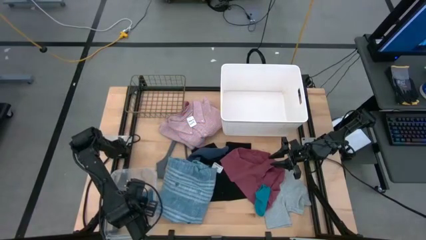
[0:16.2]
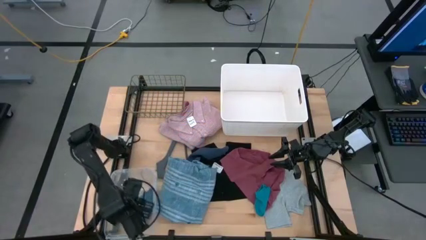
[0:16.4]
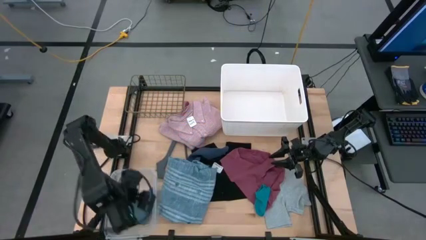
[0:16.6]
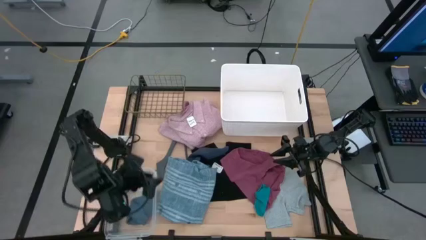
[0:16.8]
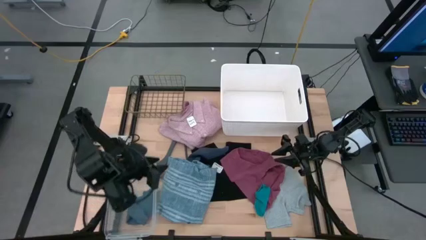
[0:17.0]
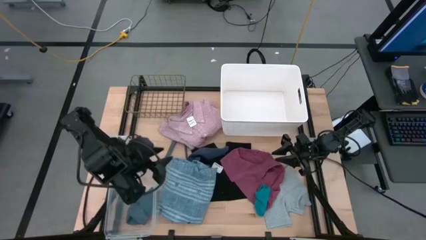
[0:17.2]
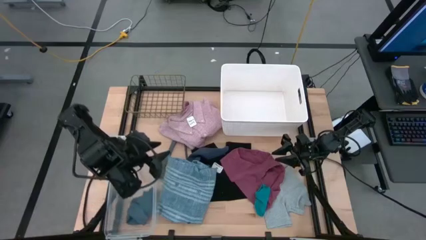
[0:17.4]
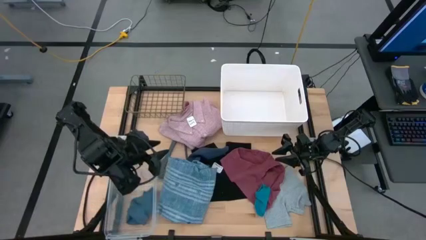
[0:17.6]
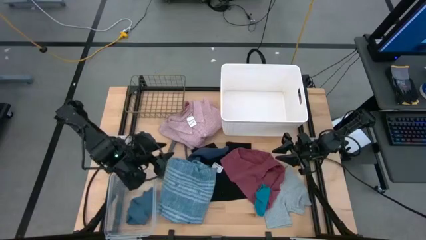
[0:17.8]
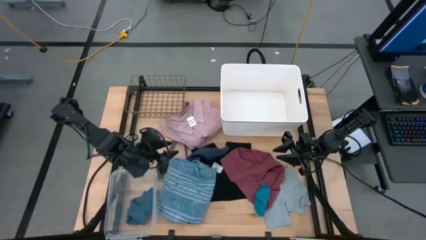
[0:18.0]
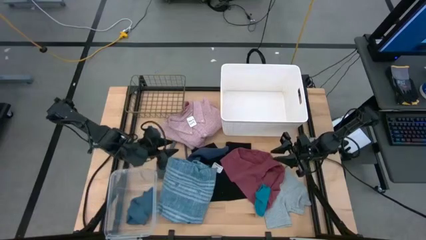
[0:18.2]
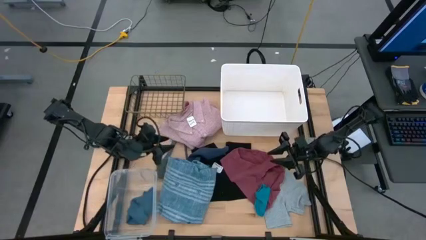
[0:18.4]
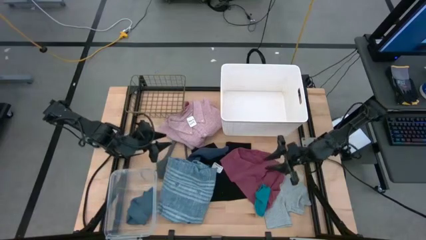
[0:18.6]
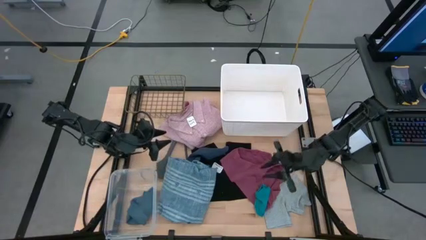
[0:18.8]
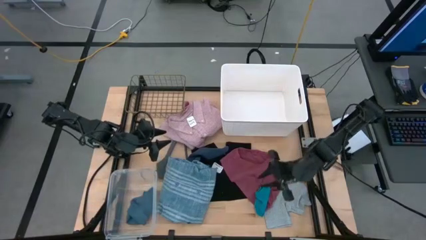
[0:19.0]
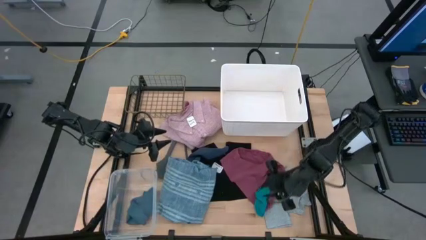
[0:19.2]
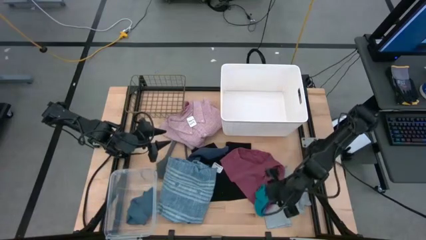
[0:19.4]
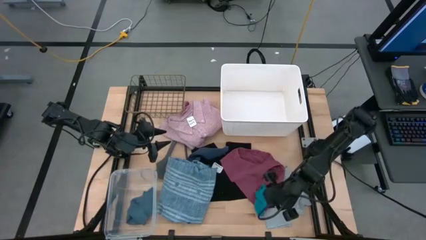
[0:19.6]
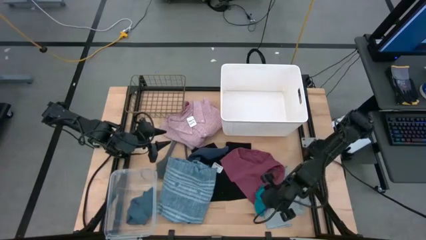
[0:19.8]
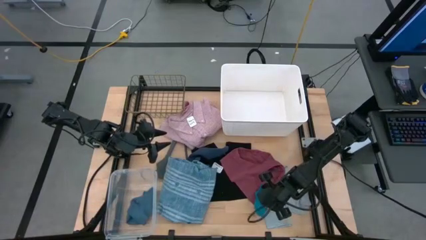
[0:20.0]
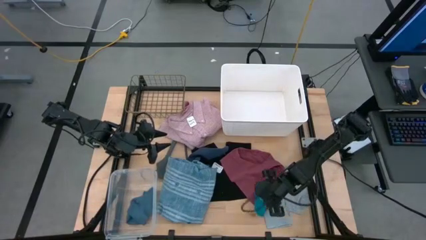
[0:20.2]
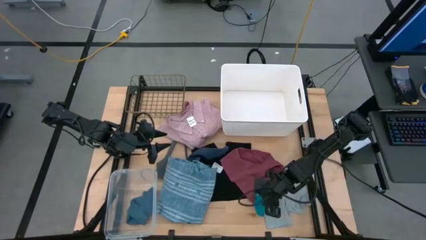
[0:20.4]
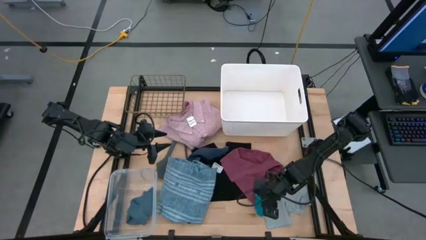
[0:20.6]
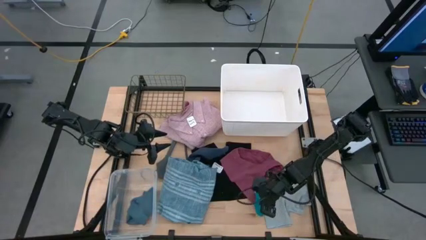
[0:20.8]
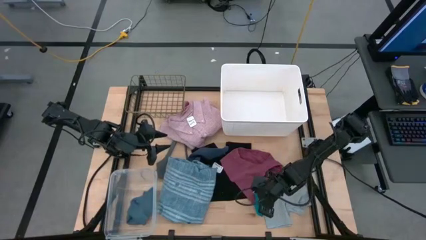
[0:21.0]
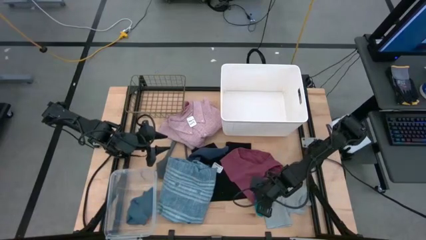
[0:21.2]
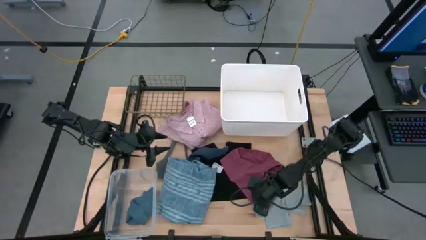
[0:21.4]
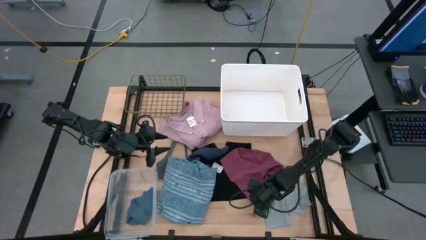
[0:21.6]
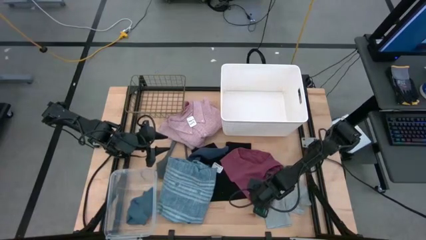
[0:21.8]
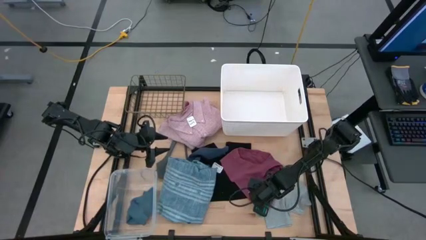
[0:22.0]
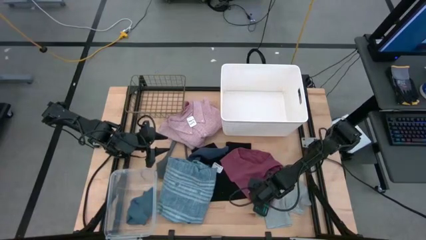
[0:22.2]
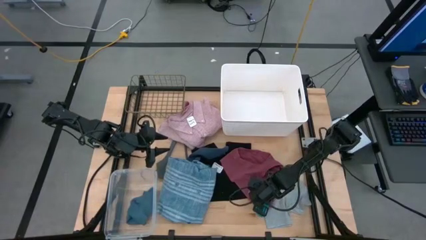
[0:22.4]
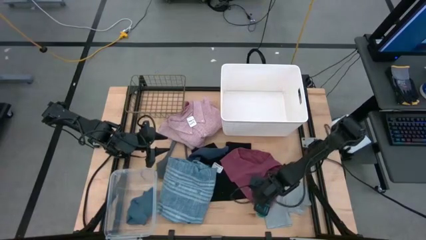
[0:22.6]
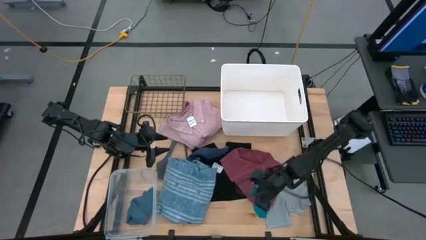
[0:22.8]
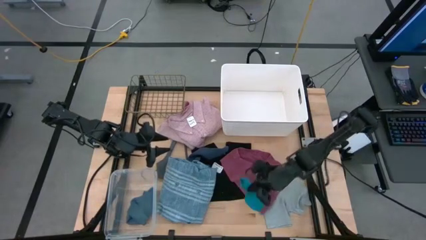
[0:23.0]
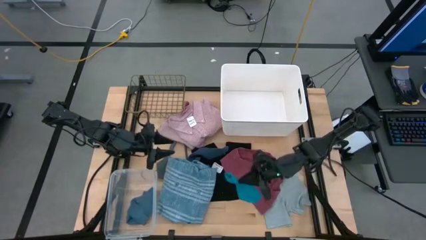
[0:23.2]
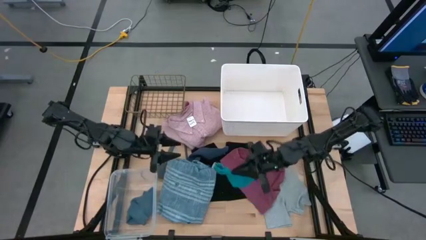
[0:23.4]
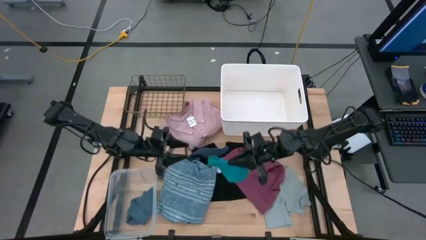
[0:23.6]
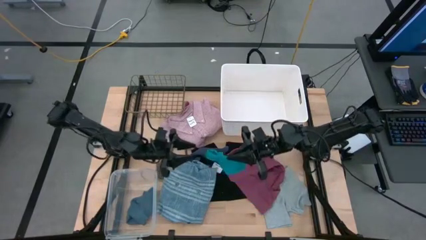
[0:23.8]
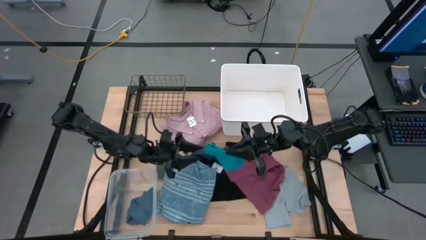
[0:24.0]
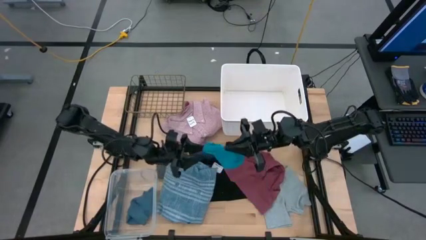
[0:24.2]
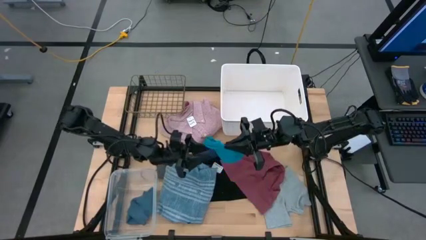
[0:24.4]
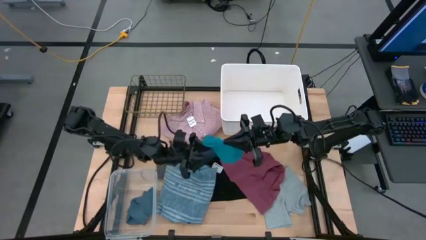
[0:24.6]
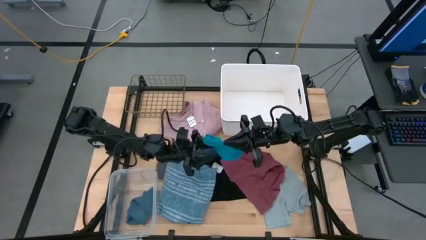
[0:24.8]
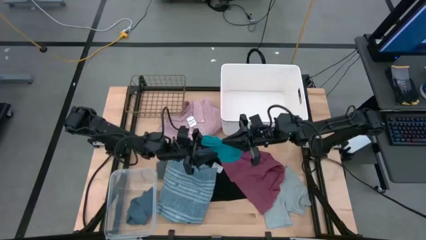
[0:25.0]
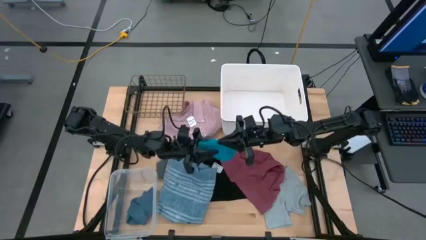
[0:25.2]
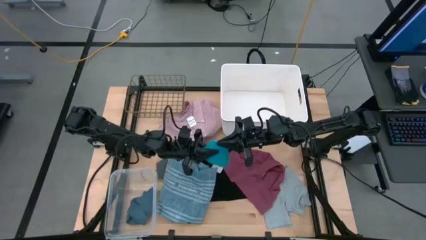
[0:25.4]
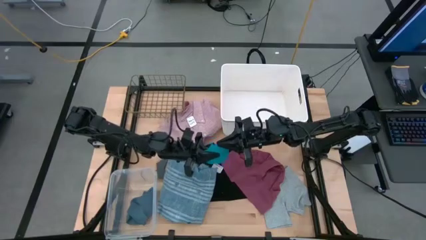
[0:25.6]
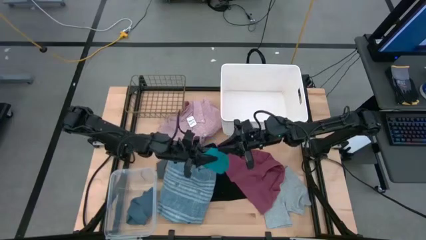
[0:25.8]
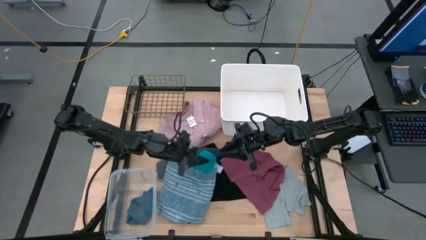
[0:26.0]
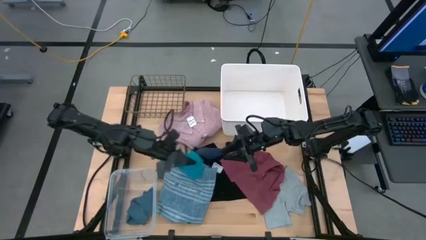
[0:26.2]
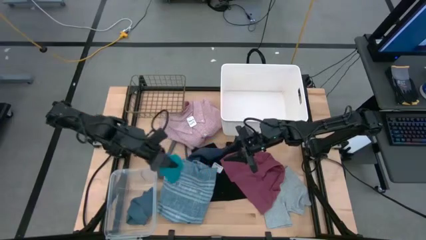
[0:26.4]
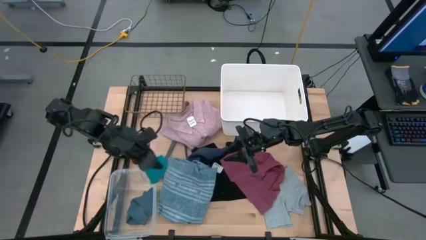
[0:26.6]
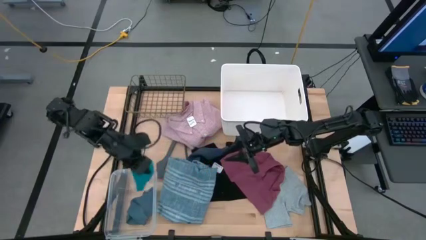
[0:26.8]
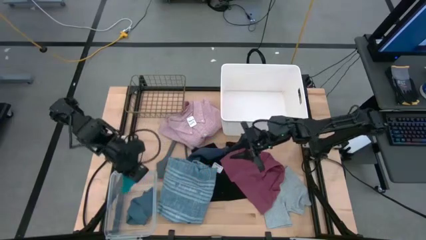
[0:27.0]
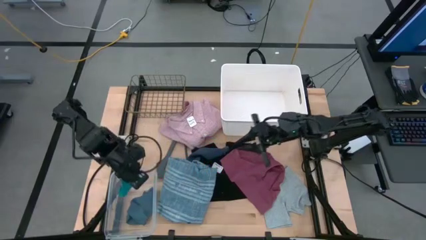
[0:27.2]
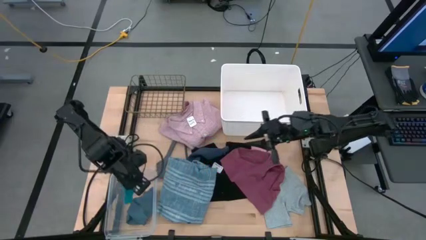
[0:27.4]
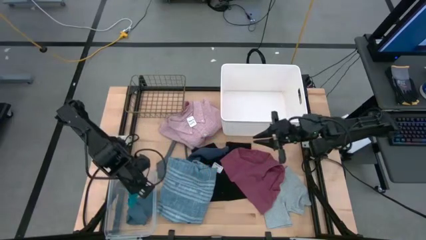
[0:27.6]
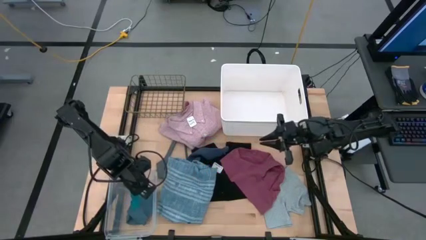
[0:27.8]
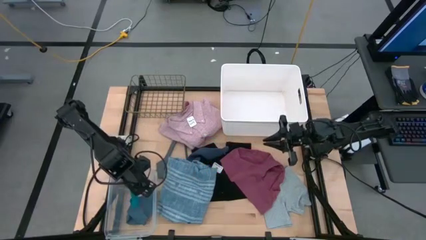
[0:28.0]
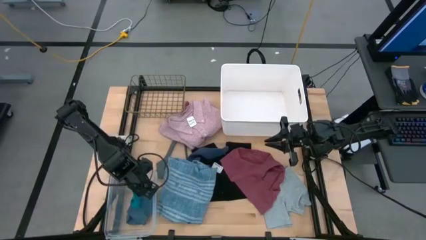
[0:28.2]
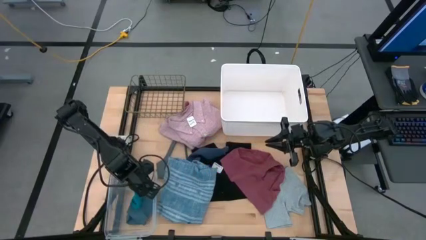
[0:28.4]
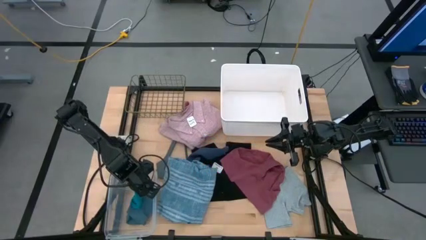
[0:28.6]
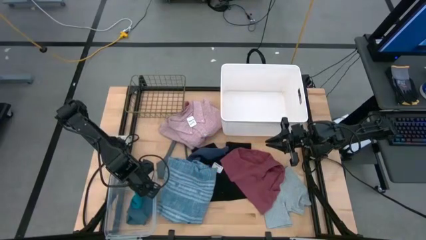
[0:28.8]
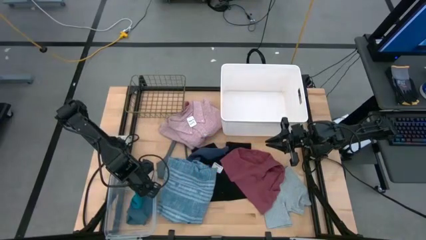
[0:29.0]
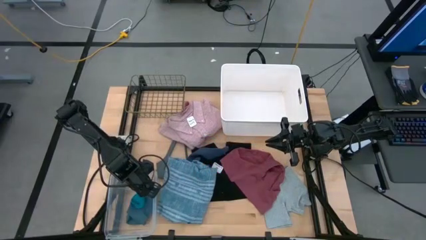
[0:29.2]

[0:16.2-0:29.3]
Task: Pick & Place Cloths
Put the blue sock into the transparent container
